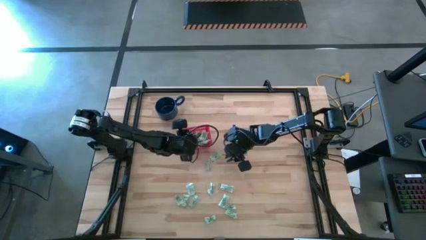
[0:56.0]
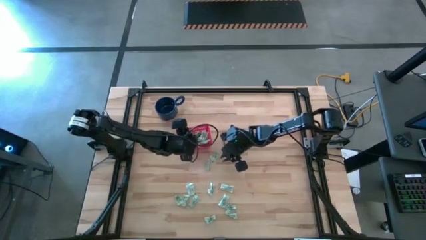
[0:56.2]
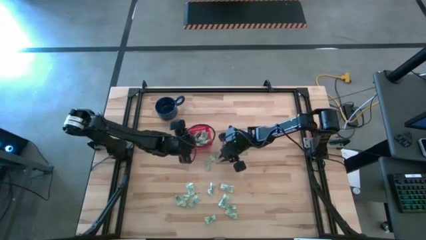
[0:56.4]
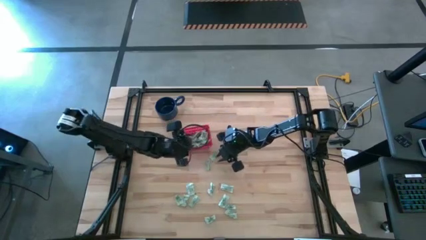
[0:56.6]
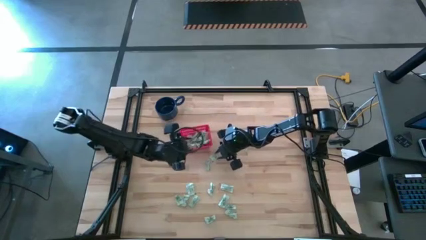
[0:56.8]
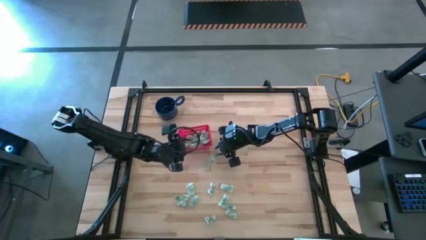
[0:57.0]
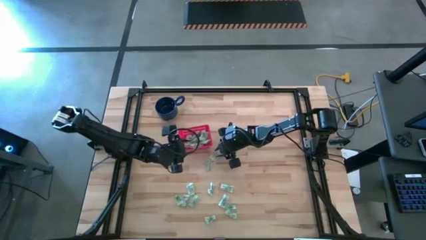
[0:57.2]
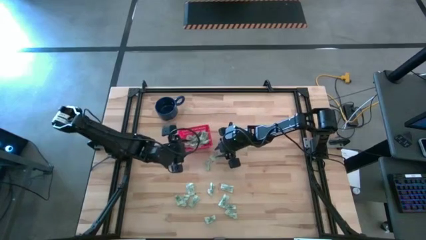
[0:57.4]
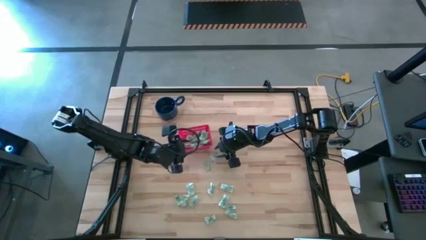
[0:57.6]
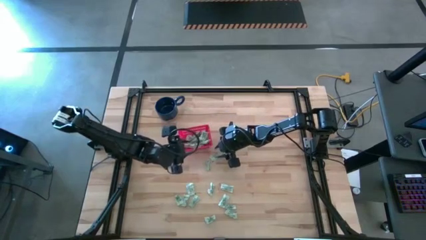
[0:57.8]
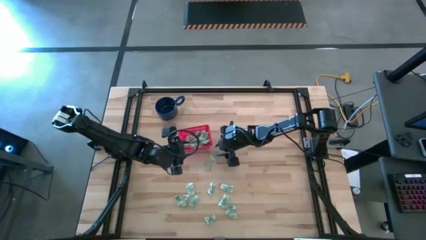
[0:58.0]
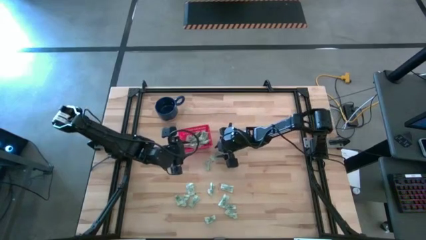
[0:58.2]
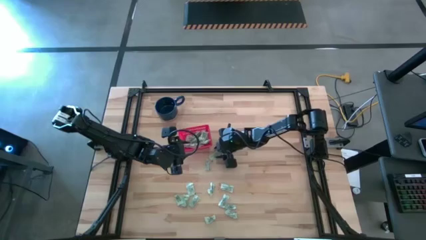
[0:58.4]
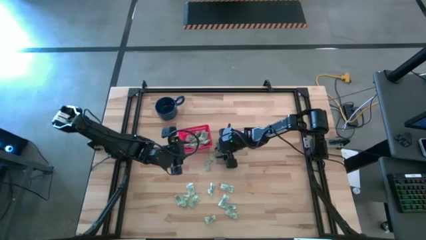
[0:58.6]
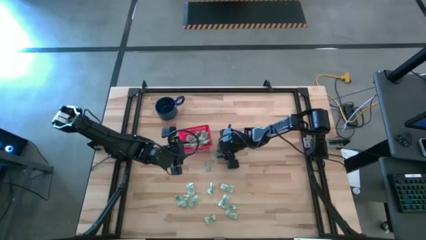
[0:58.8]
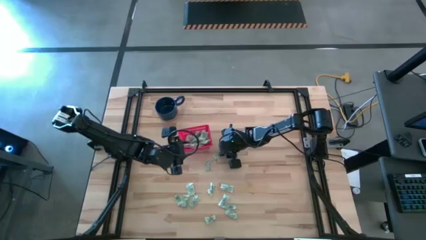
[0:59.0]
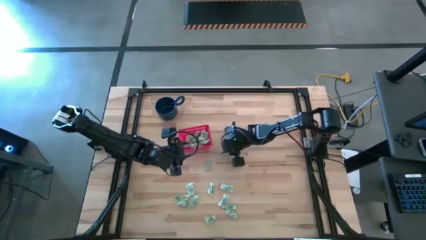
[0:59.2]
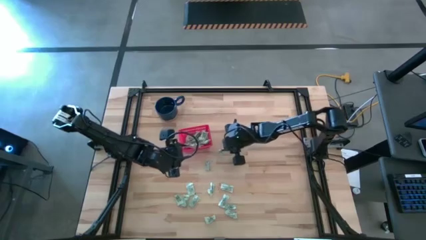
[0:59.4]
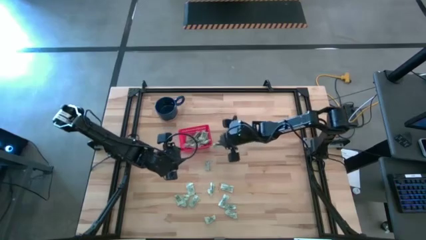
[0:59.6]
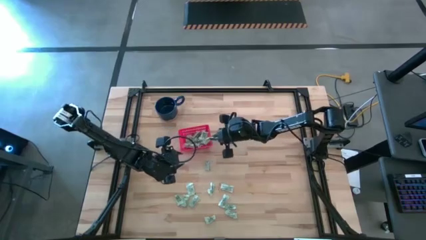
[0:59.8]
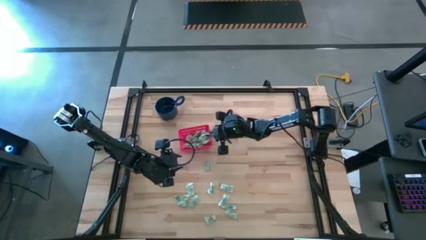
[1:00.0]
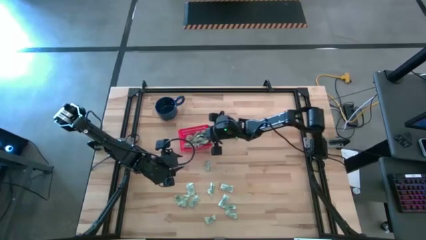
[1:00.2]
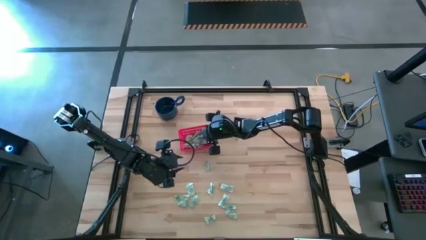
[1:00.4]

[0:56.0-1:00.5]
Task: Pick and place items into bin
Put the green stevia packet into the red bin

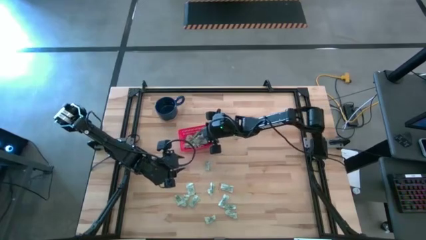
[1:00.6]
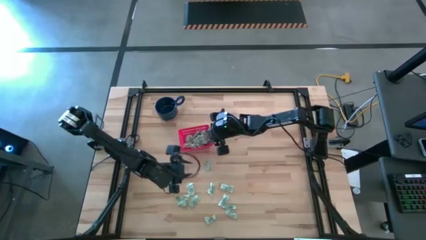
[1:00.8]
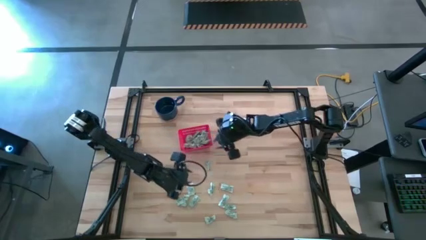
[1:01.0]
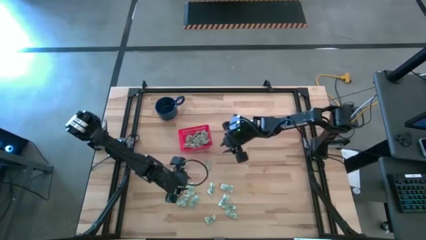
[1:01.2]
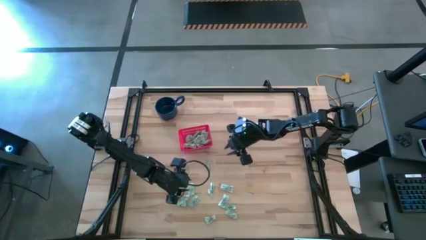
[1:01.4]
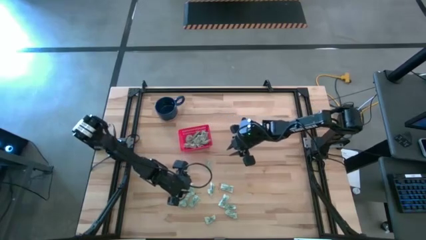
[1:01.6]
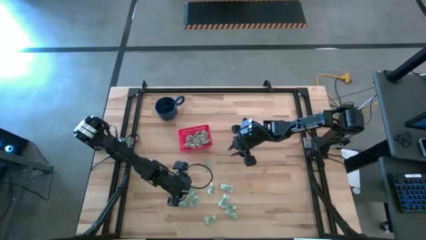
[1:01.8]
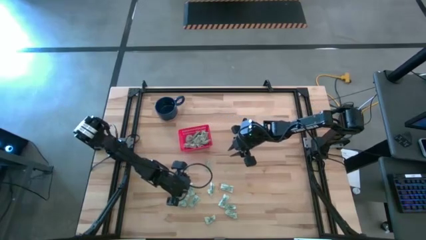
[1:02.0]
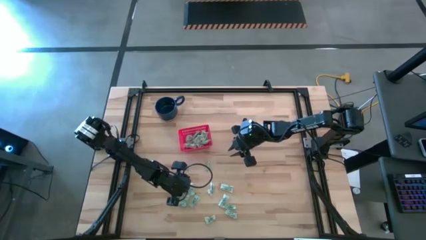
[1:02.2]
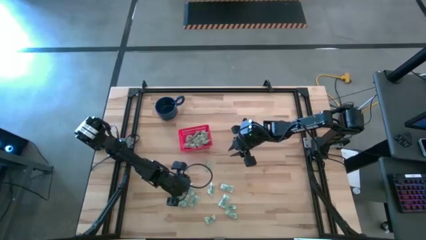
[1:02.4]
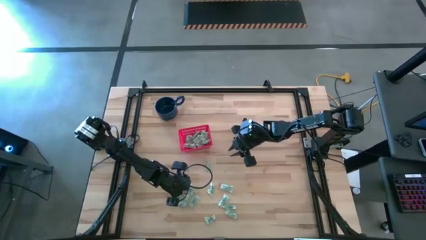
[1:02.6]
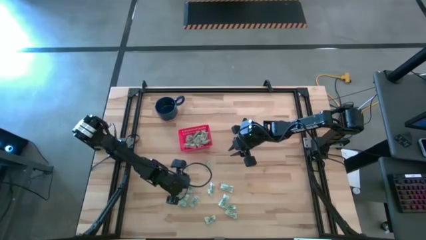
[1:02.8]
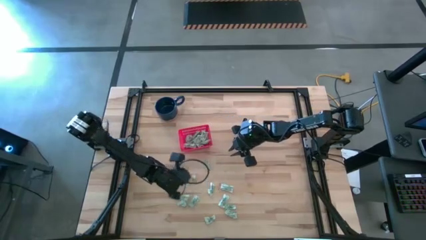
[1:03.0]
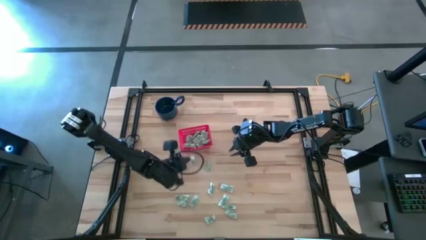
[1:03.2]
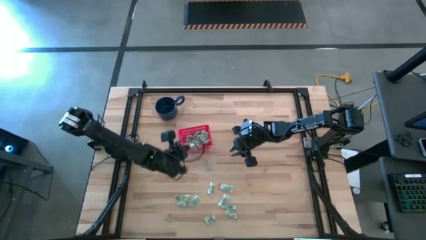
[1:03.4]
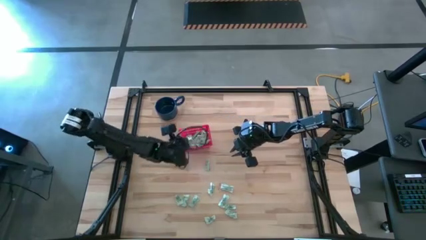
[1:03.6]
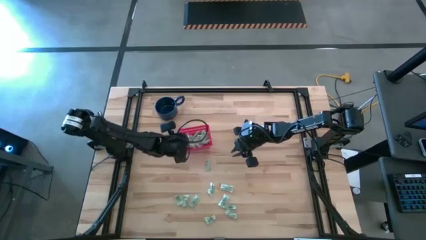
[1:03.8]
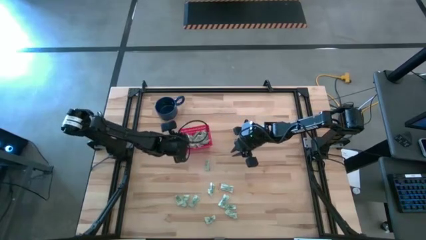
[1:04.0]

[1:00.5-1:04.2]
Put the green stevia packet into the red bin

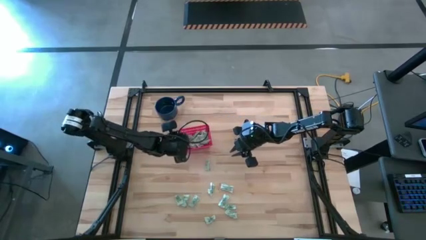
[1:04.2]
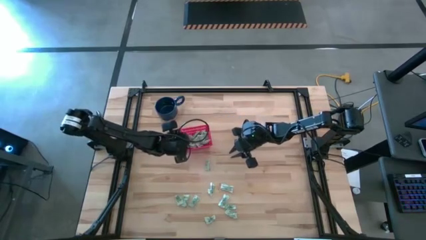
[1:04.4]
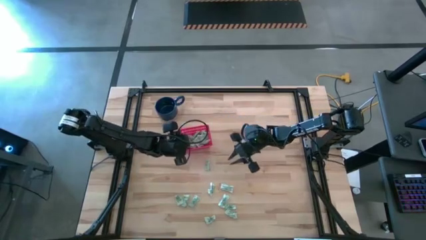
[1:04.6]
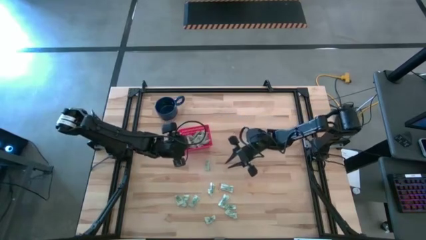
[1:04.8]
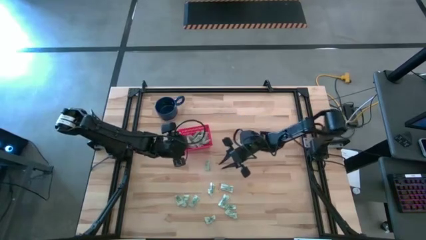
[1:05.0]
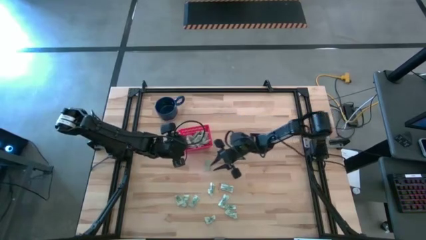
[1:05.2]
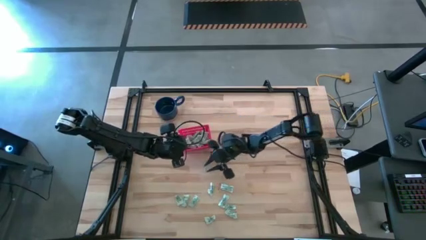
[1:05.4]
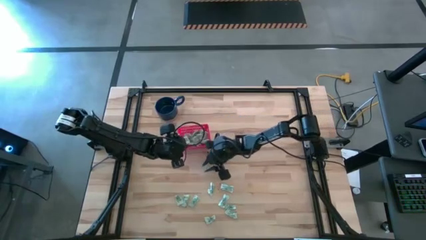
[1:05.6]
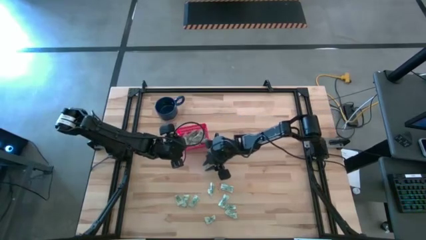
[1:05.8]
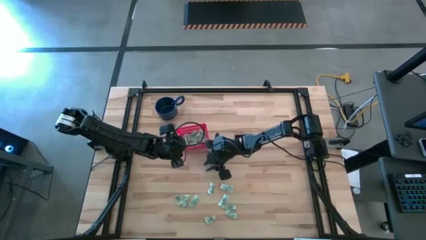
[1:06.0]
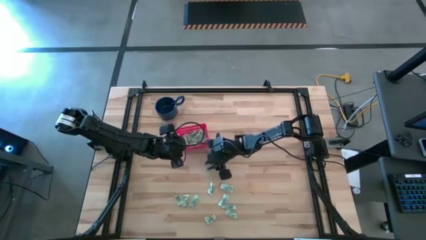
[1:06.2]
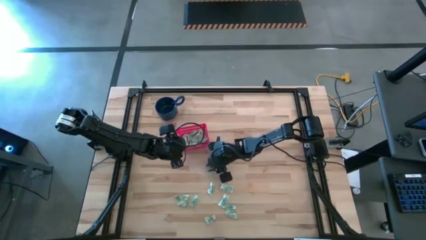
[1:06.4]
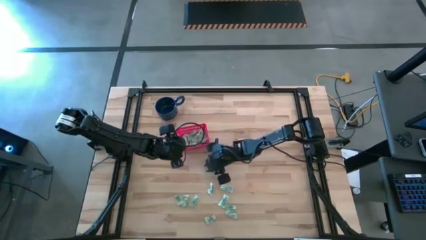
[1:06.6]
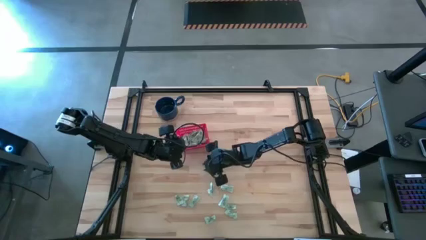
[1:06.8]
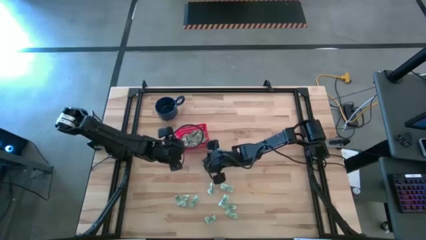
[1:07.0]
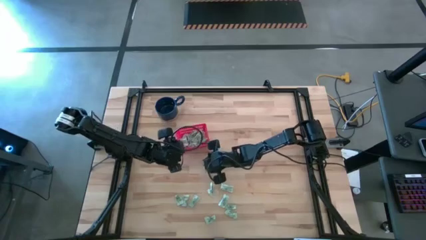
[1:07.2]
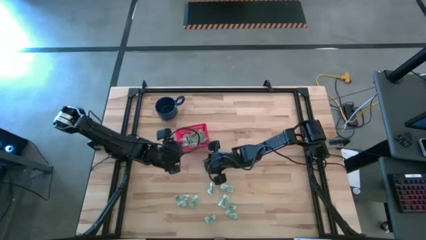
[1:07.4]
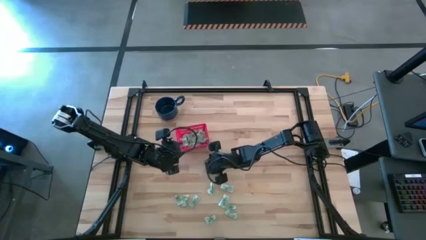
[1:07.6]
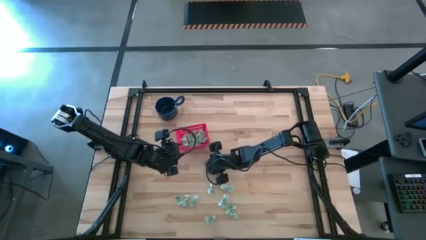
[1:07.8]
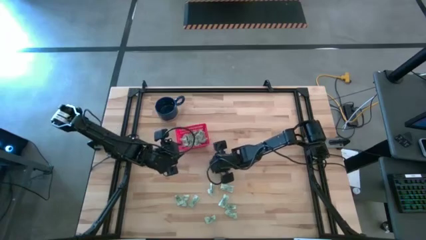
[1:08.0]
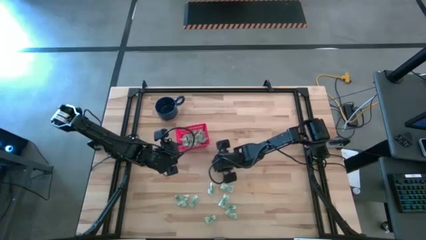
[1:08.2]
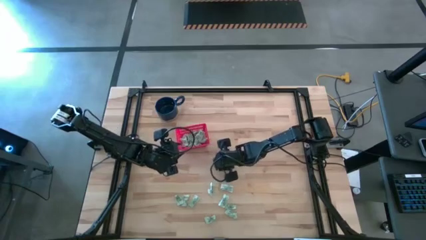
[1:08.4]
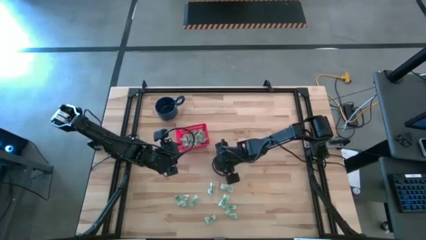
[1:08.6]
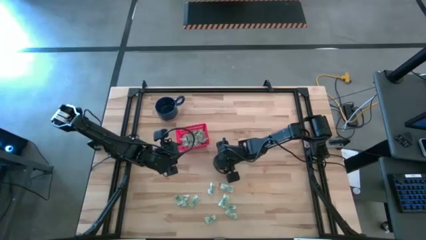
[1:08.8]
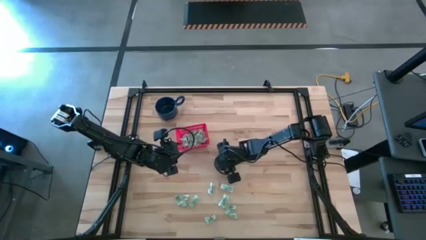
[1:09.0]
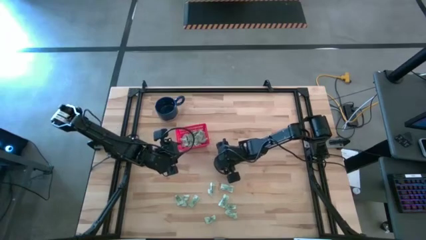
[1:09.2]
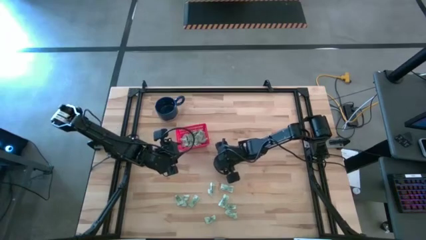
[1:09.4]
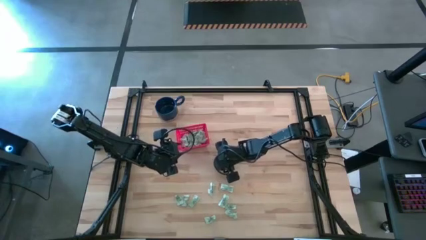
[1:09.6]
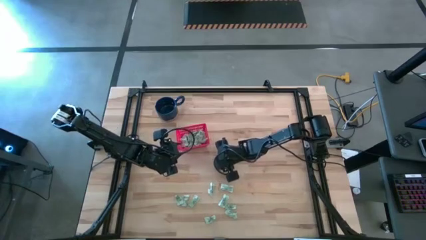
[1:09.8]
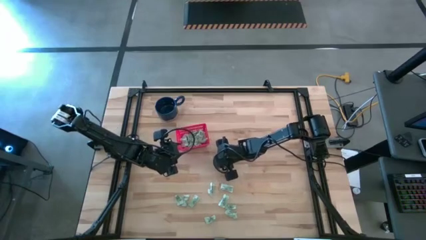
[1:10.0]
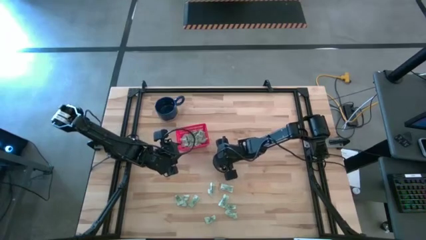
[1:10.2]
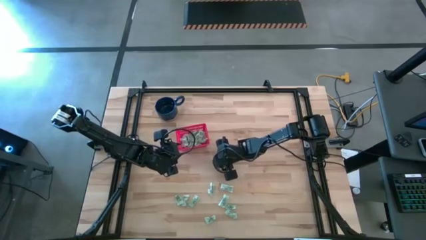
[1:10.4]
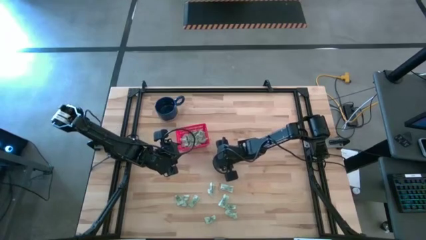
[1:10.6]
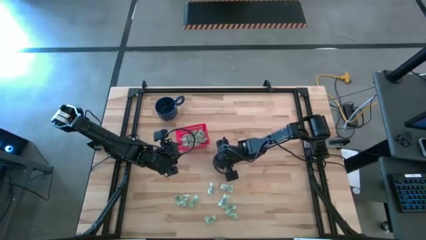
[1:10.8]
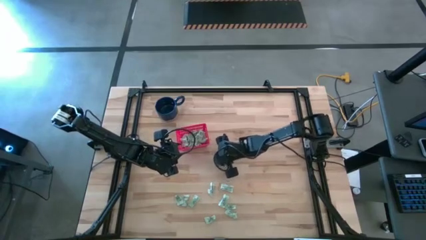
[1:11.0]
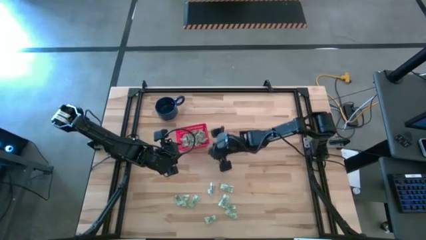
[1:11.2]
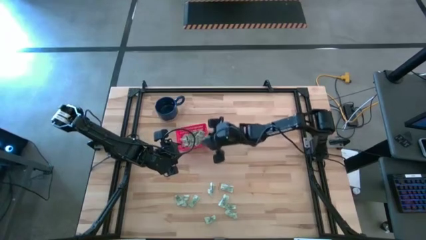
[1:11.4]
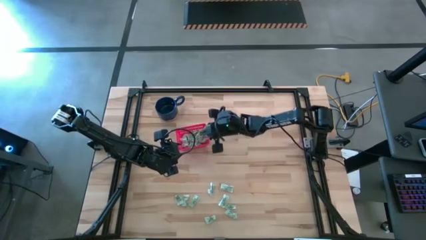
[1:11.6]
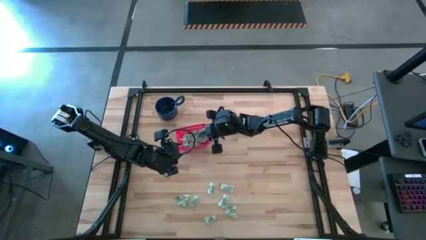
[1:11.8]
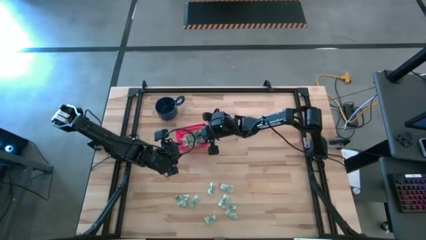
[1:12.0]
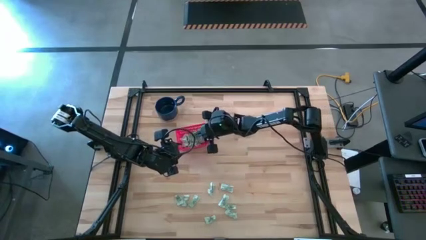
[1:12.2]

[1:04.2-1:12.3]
Put the green stevia packet into the red bin
